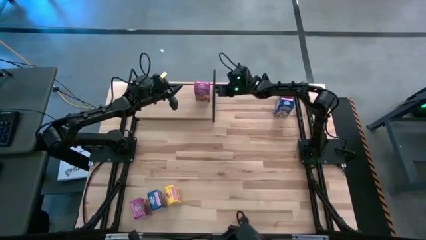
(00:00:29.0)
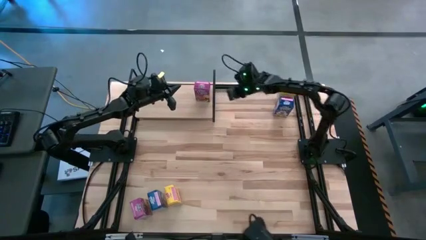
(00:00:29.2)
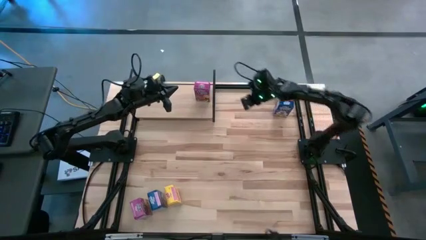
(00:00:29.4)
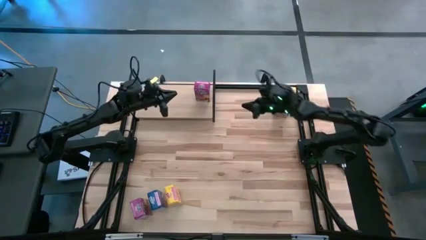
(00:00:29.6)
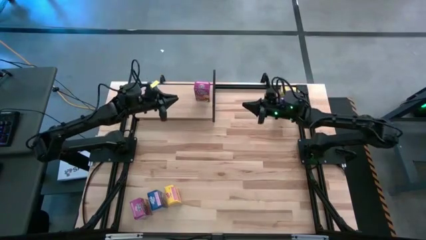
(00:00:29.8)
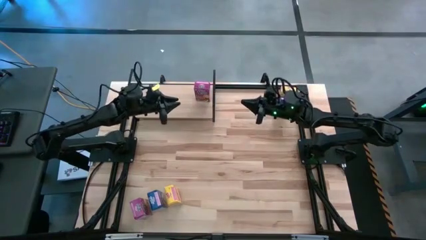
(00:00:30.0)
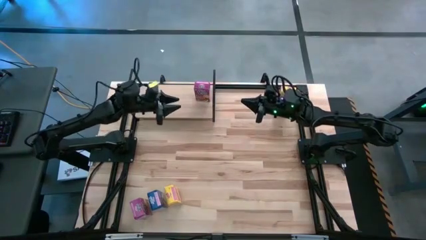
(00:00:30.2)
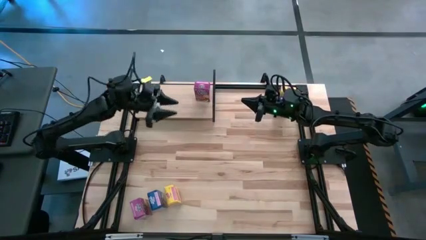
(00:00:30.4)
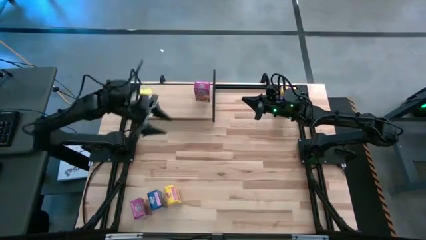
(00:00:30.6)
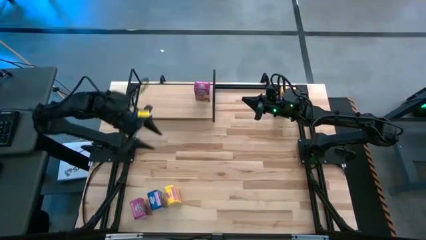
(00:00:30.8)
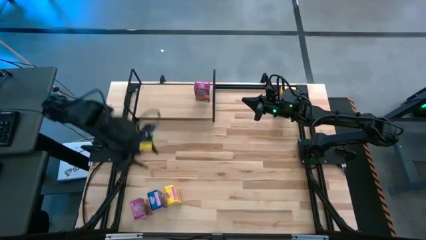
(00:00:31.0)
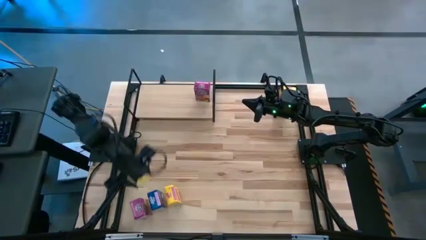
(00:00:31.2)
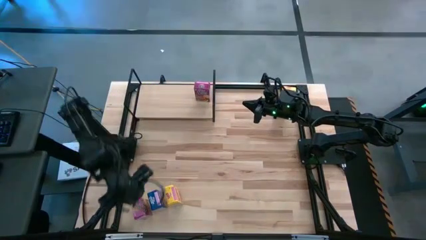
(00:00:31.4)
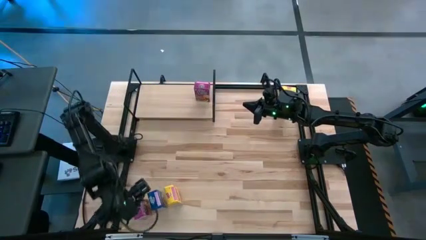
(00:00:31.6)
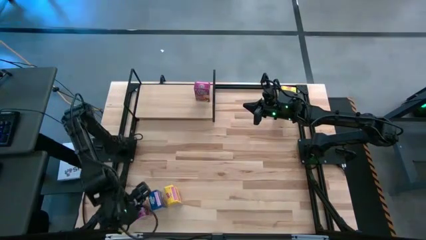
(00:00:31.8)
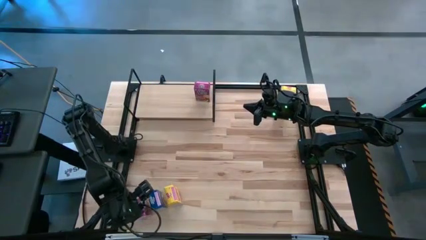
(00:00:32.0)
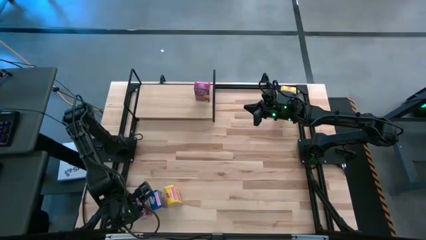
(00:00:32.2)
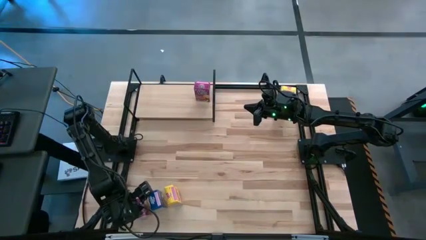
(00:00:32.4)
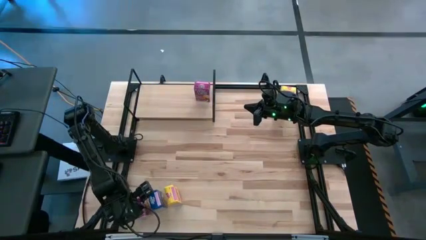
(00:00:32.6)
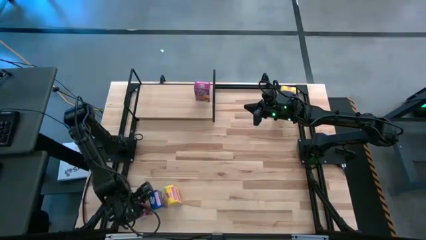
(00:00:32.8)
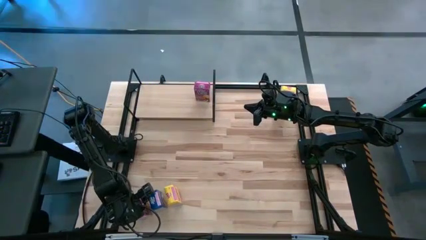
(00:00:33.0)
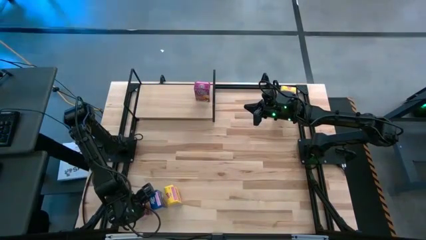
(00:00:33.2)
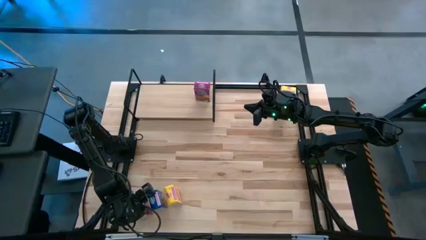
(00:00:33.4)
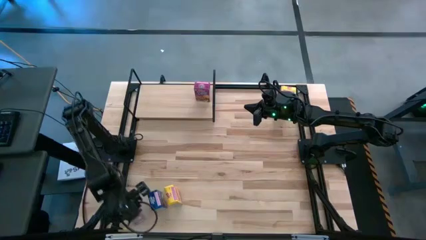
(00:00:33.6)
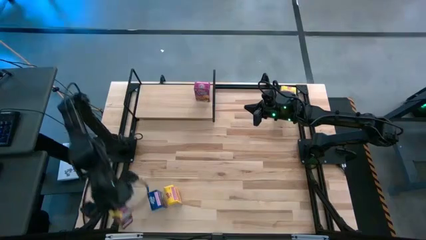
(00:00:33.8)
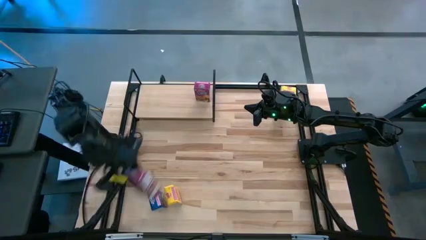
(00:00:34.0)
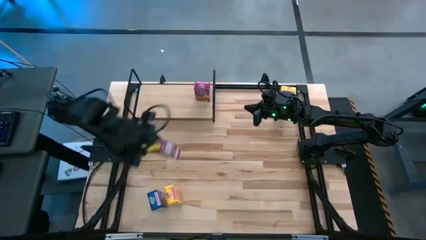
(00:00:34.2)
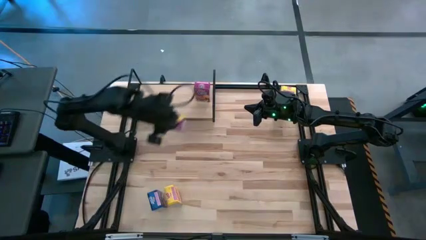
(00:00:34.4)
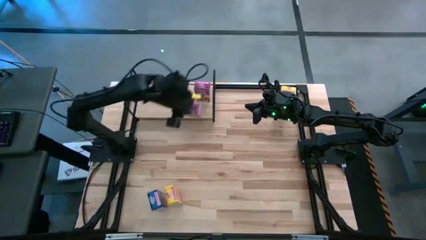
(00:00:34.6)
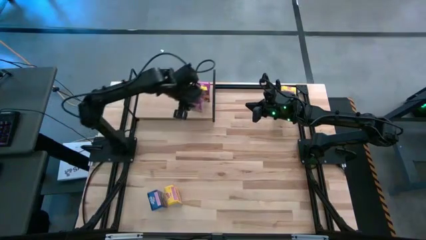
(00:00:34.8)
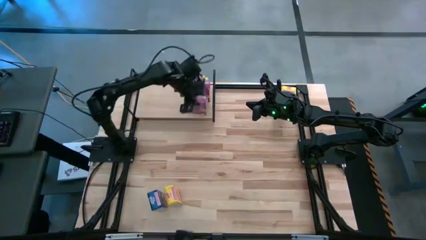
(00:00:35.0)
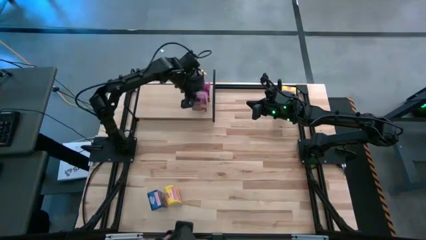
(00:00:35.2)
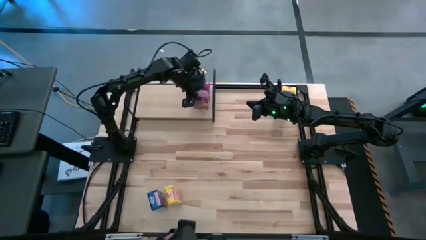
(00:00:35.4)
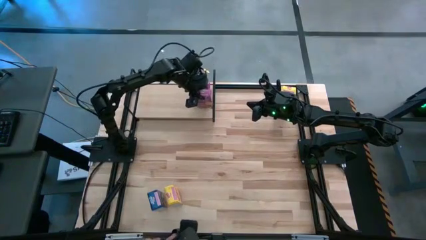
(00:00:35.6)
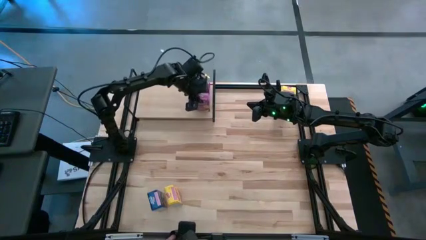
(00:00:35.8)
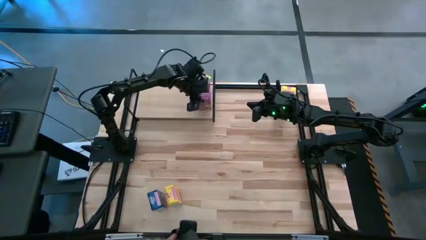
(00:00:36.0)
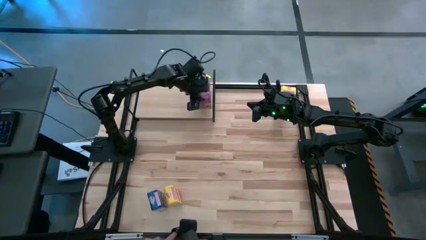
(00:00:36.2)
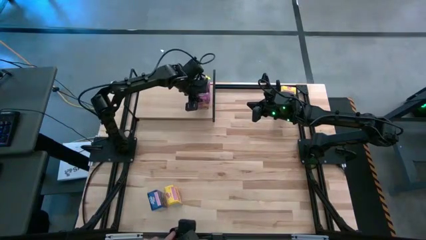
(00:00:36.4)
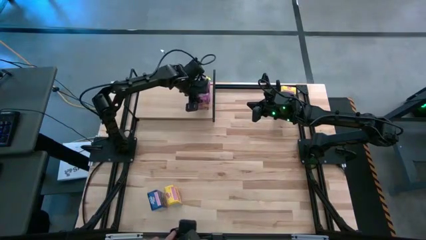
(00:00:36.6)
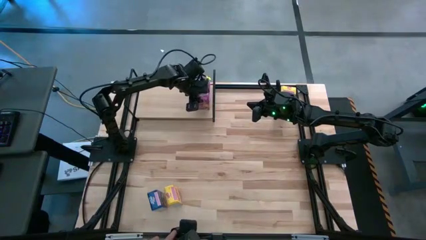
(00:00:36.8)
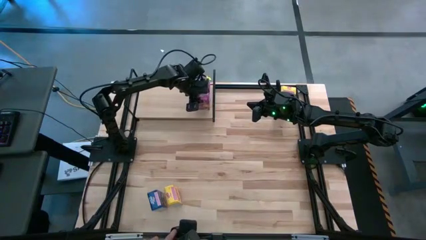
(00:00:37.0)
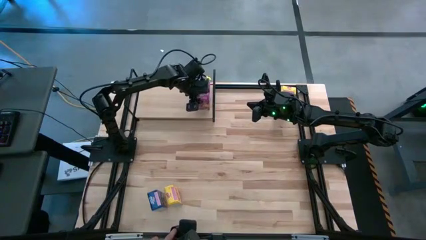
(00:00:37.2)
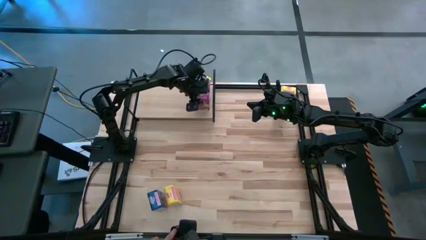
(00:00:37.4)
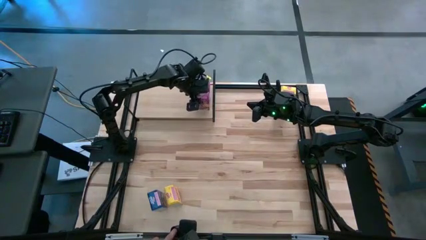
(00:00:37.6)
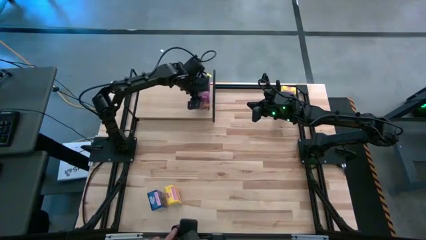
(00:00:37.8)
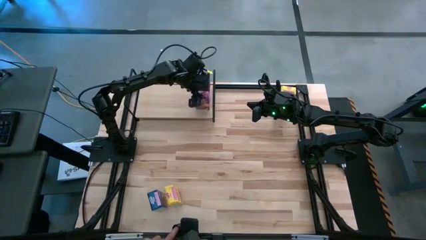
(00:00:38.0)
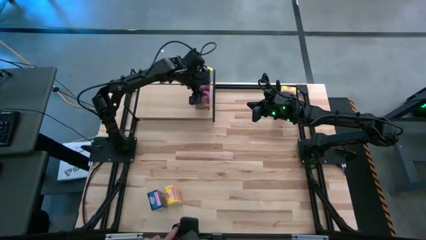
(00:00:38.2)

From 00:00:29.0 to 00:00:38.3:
Task: Stack cereal on shelf
Align the purple cereal box on the shelf

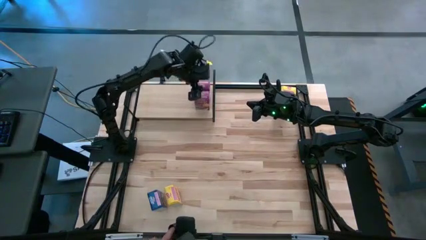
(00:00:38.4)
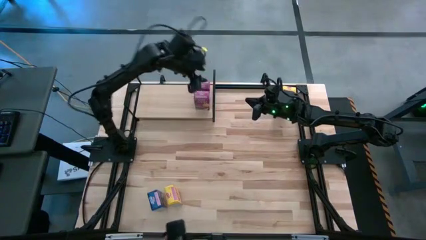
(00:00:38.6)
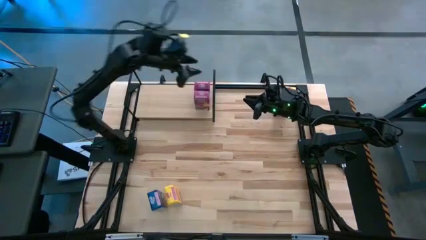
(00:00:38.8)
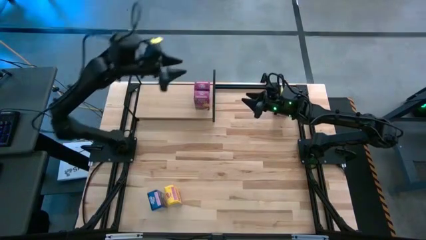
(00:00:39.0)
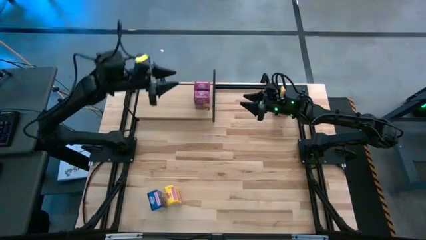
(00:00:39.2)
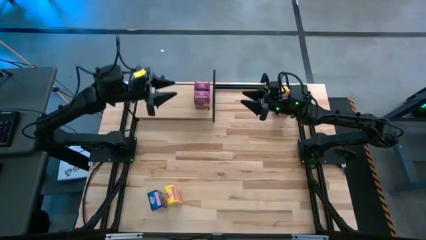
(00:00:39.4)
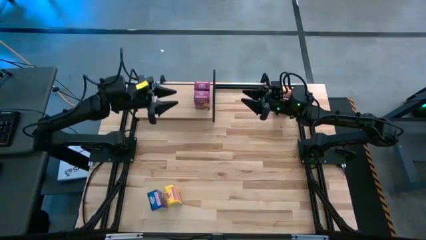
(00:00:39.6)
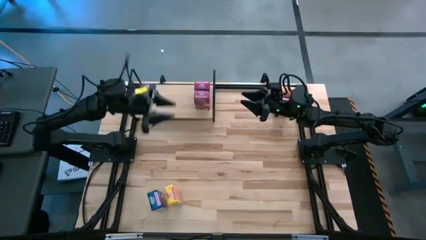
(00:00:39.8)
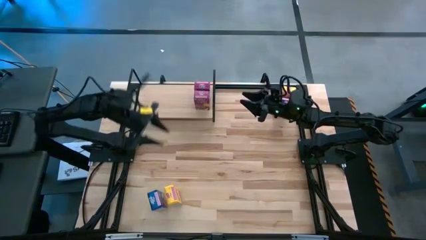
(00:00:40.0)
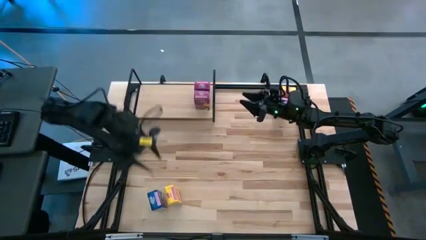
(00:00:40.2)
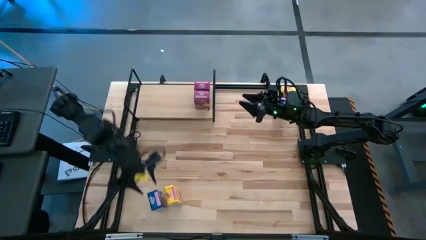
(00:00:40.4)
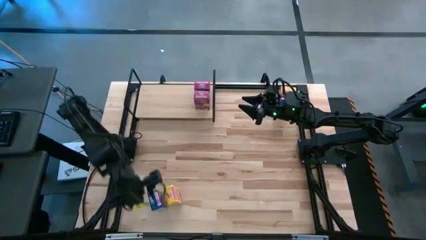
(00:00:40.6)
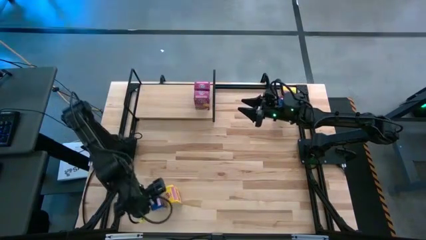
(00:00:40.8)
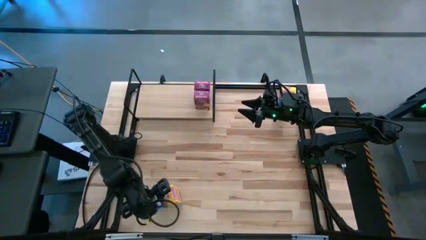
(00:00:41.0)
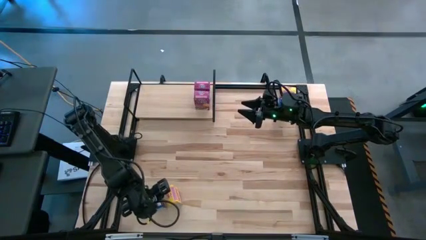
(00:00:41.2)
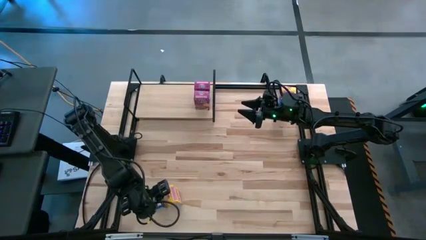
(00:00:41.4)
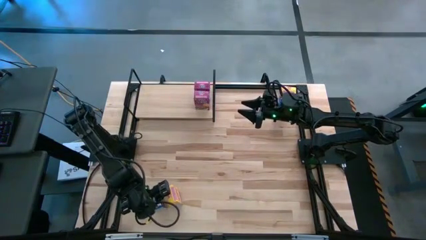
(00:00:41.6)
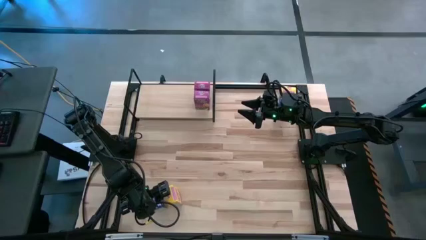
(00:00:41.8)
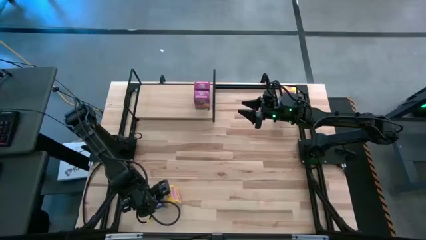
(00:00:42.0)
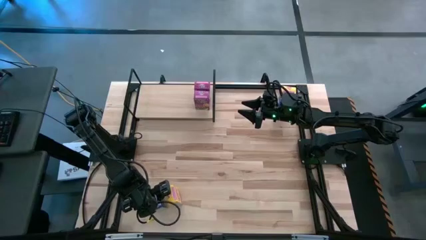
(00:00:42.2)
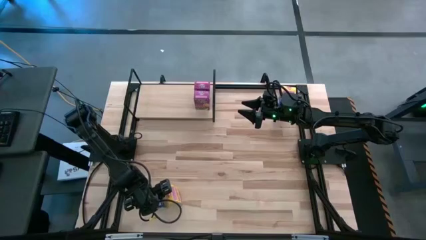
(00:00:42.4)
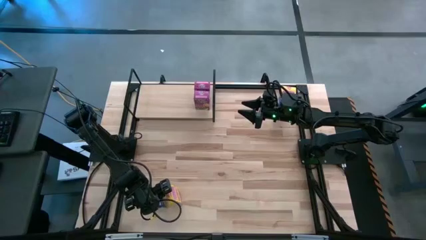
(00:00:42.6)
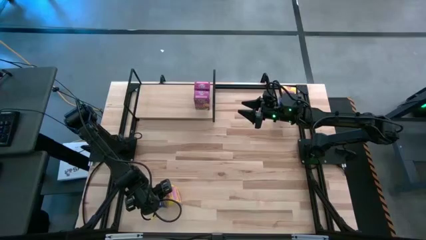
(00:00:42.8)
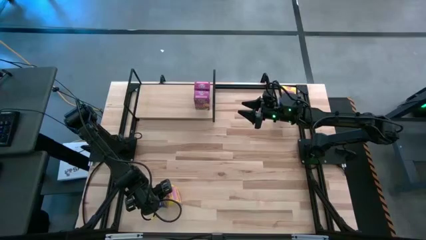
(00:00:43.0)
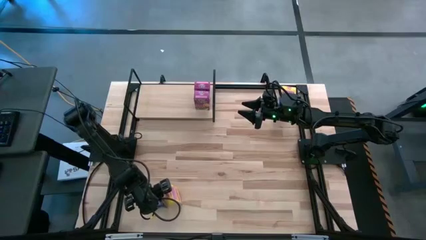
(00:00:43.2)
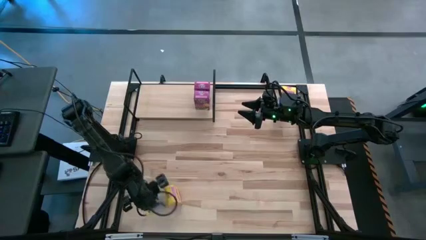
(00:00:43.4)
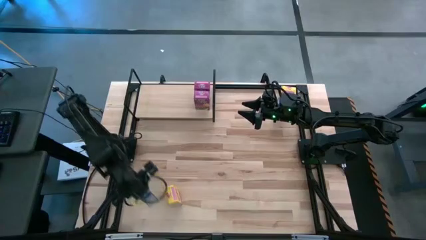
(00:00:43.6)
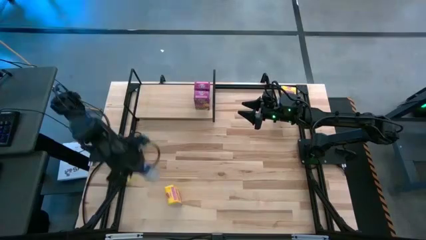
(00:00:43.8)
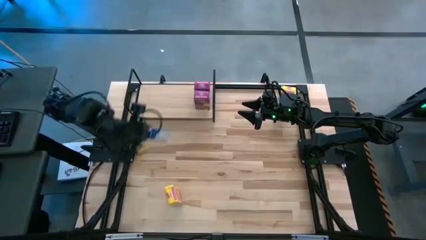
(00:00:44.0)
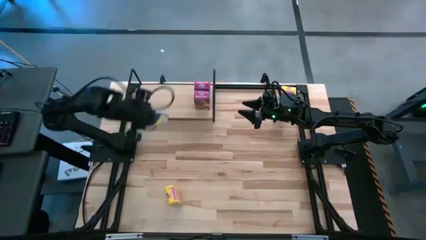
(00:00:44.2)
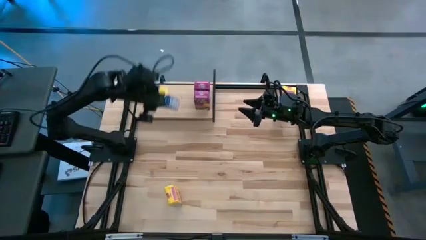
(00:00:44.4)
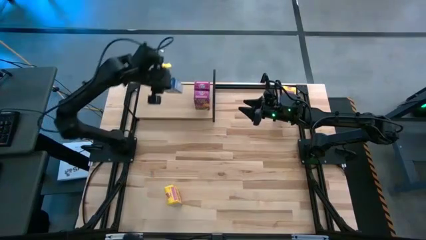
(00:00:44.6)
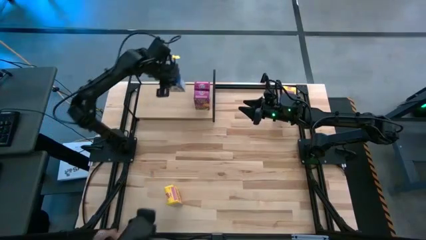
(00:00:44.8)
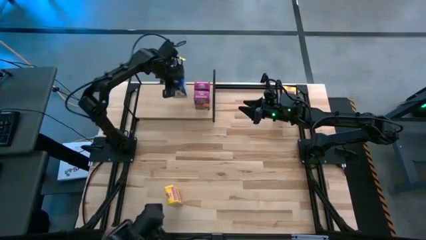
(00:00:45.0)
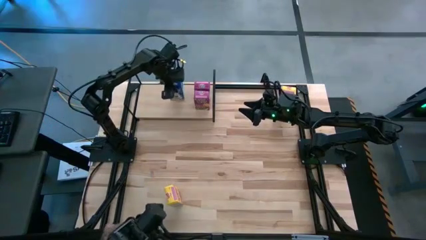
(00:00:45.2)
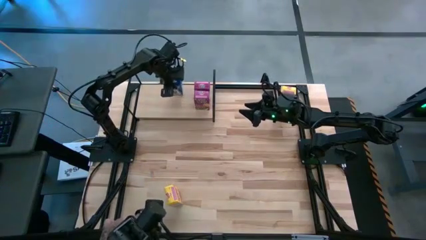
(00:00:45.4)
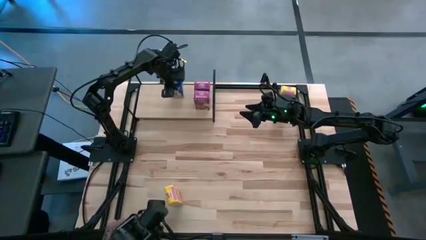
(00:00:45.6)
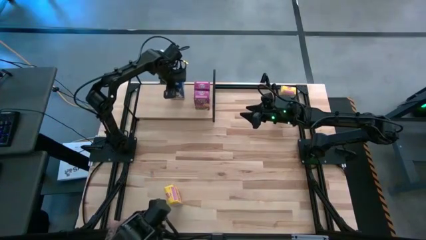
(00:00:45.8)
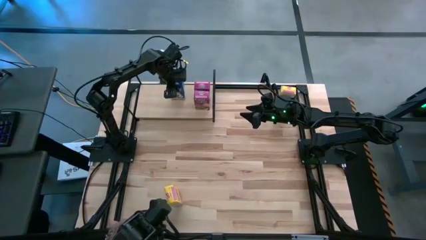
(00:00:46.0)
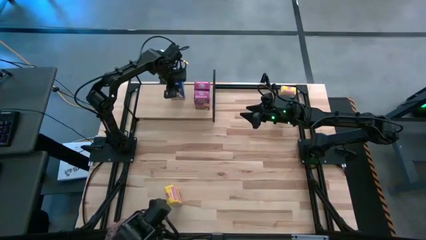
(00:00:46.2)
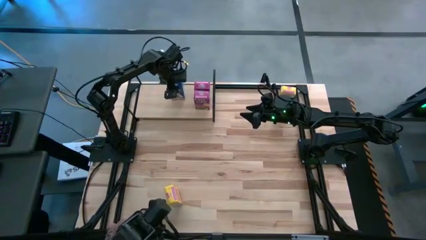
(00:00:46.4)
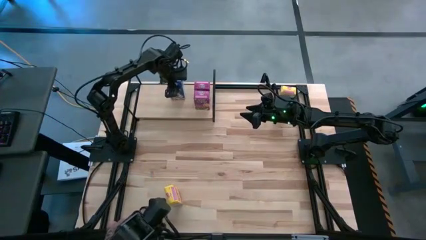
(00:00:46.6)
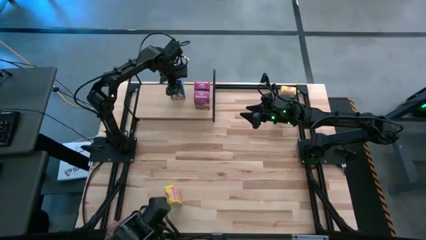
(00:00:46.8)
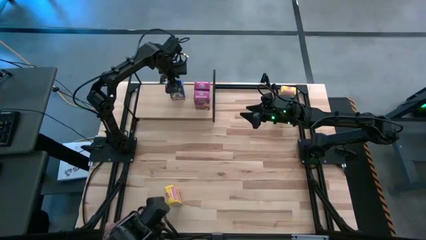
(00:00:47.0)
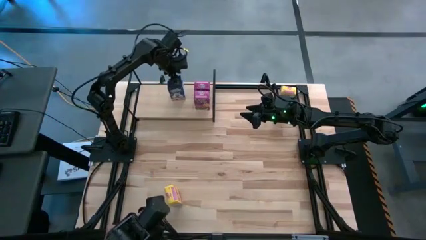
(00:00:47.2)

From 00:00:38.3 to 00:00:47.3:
Put the bottom blue cereal box on the shelf
